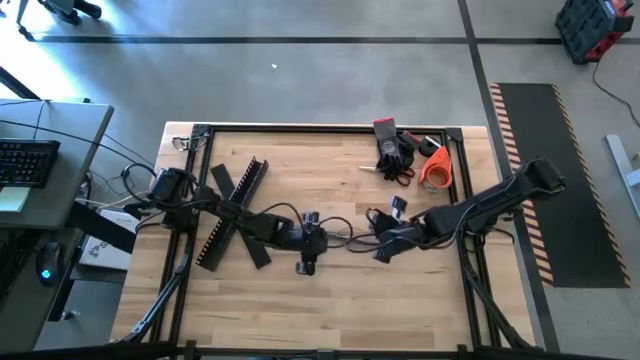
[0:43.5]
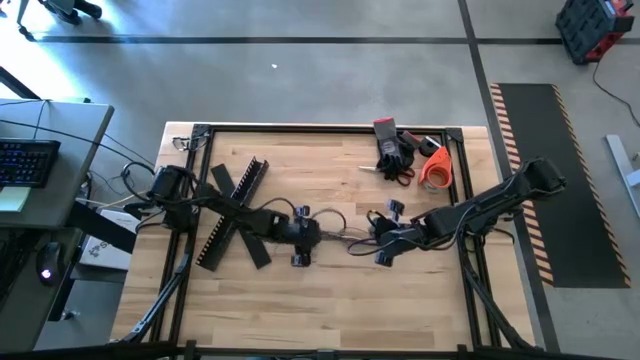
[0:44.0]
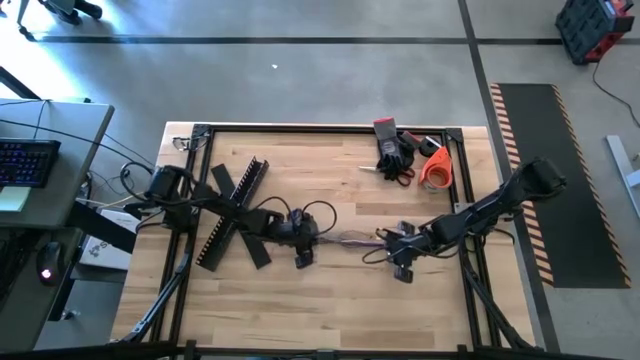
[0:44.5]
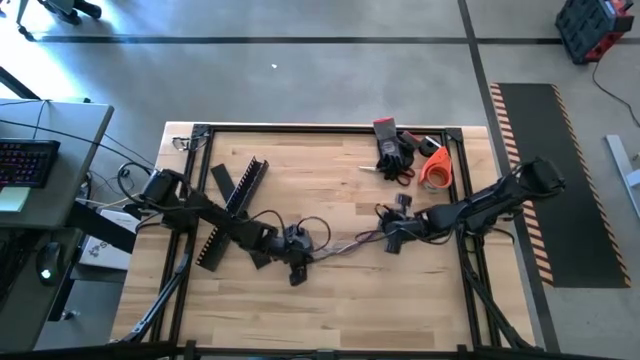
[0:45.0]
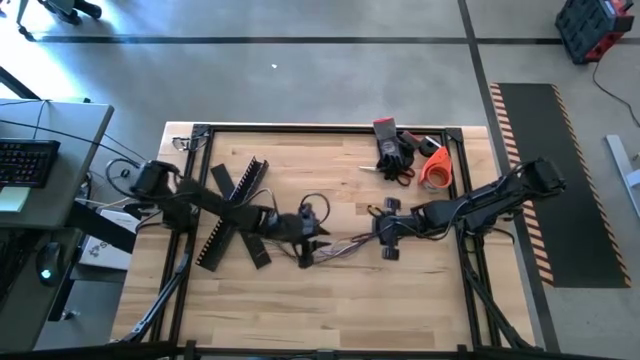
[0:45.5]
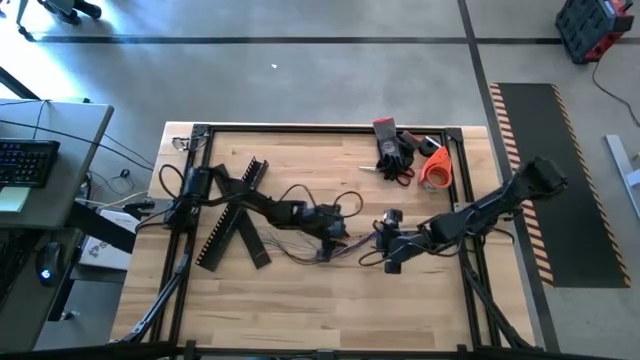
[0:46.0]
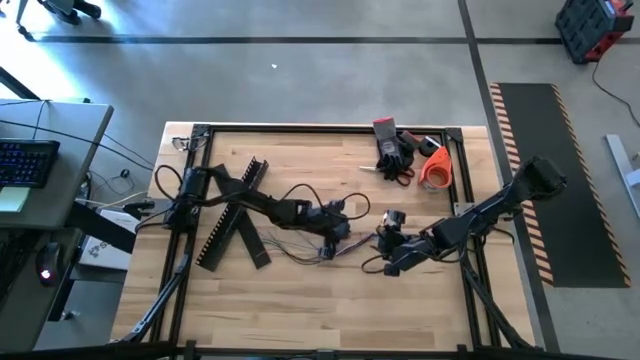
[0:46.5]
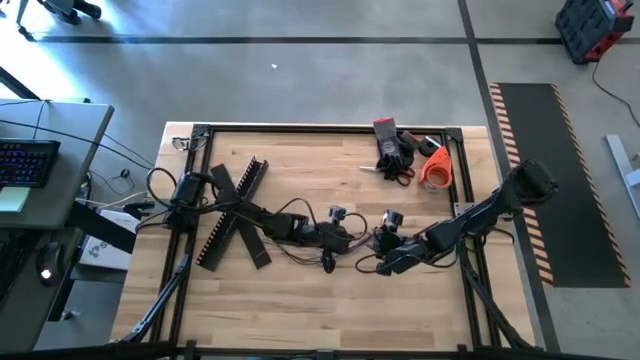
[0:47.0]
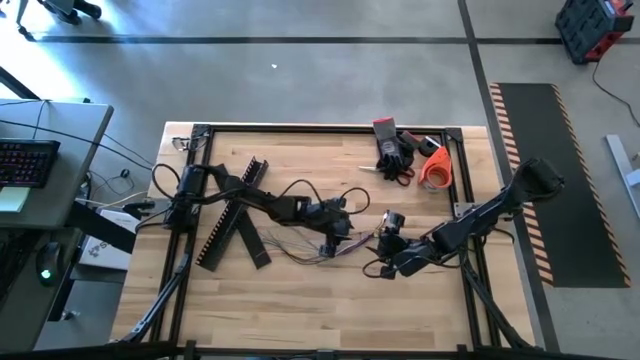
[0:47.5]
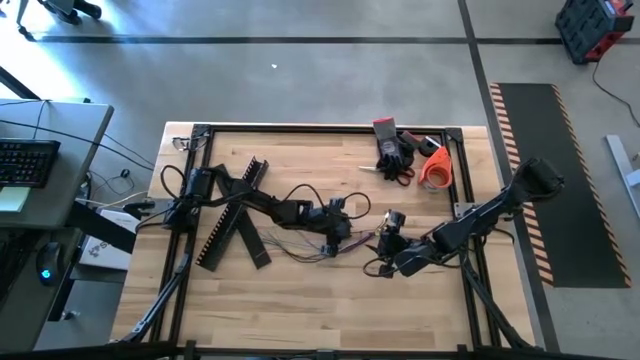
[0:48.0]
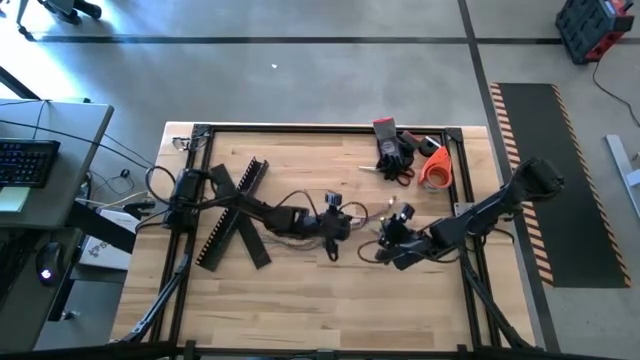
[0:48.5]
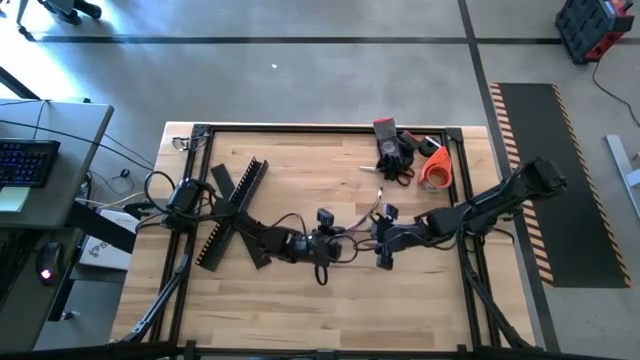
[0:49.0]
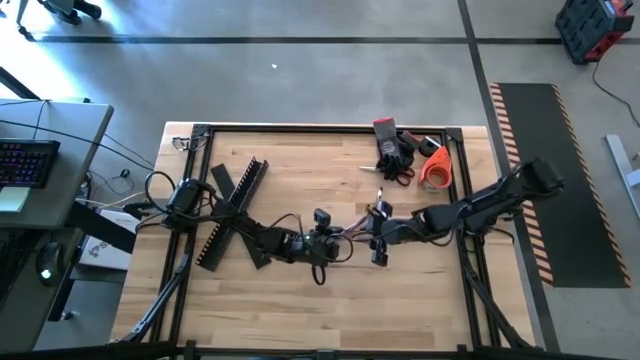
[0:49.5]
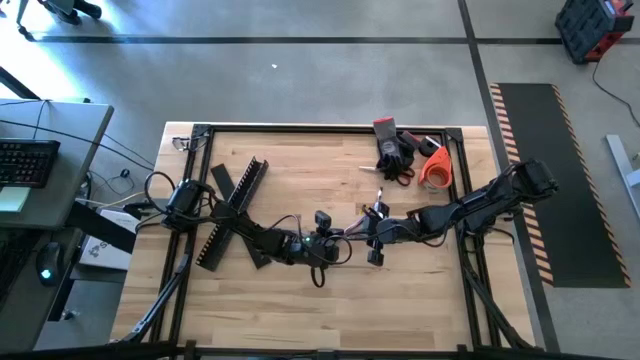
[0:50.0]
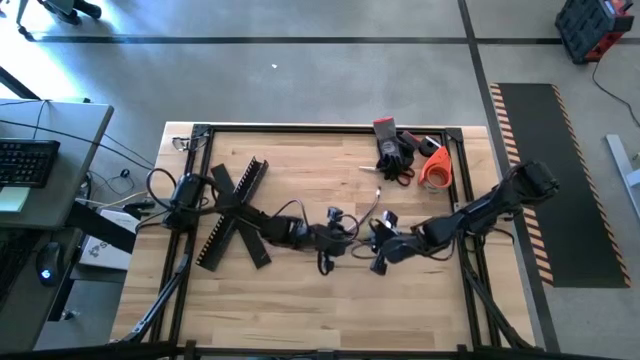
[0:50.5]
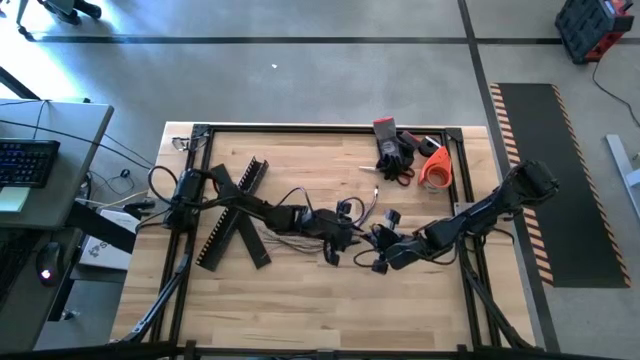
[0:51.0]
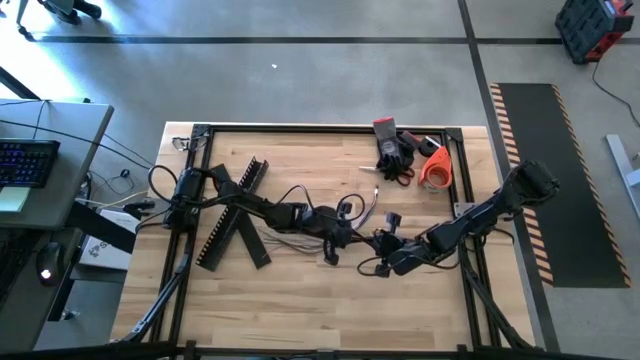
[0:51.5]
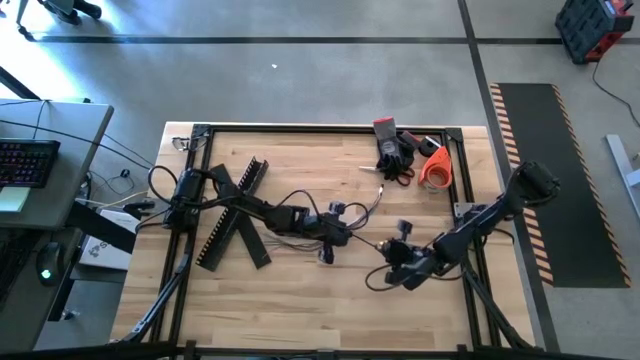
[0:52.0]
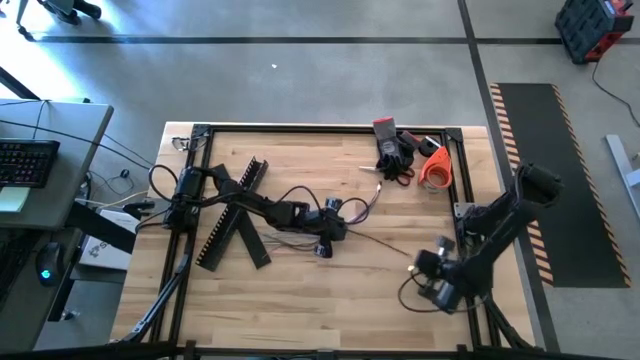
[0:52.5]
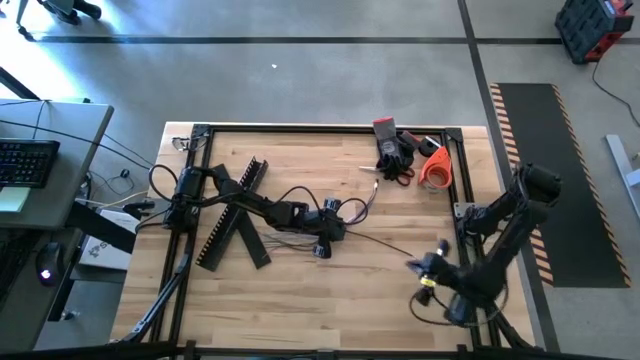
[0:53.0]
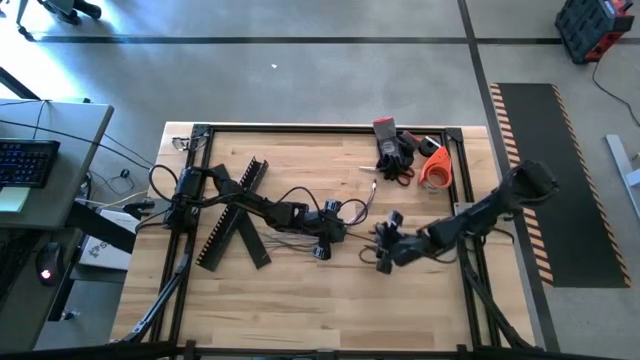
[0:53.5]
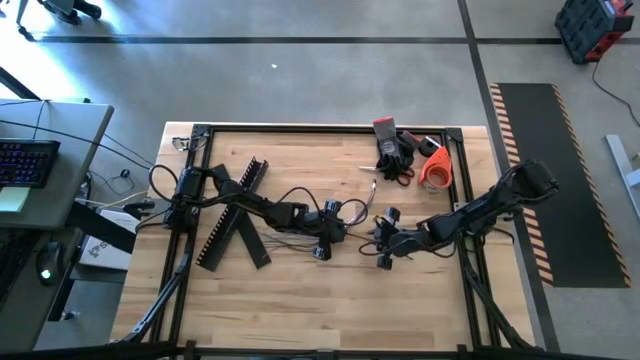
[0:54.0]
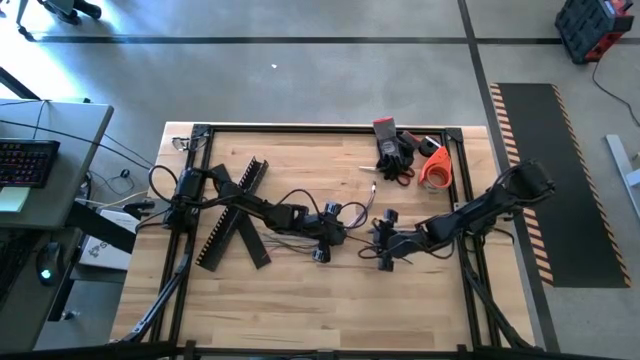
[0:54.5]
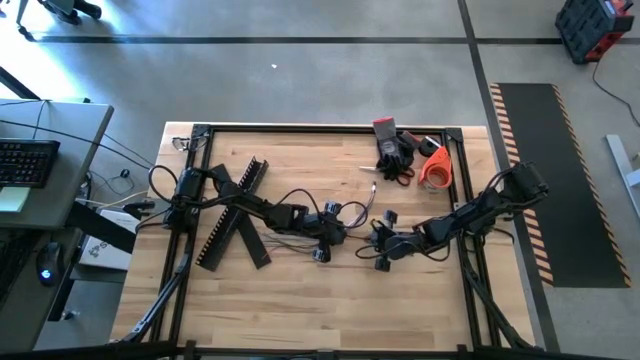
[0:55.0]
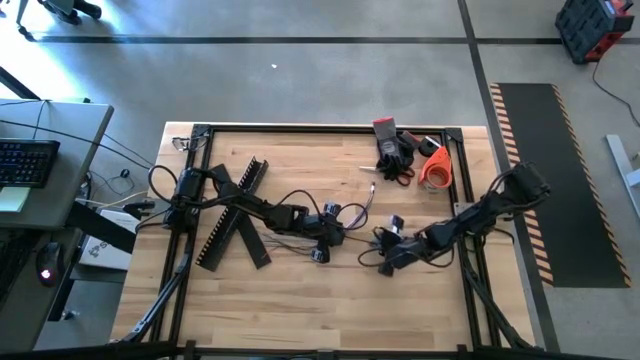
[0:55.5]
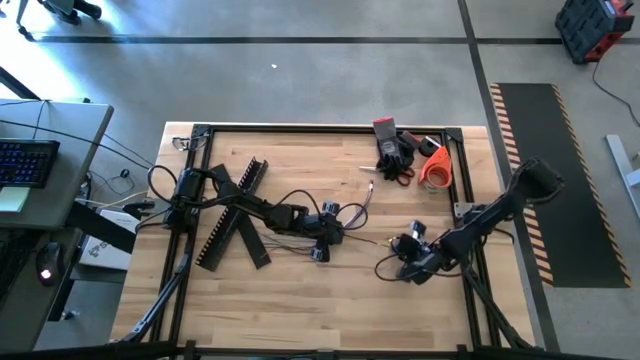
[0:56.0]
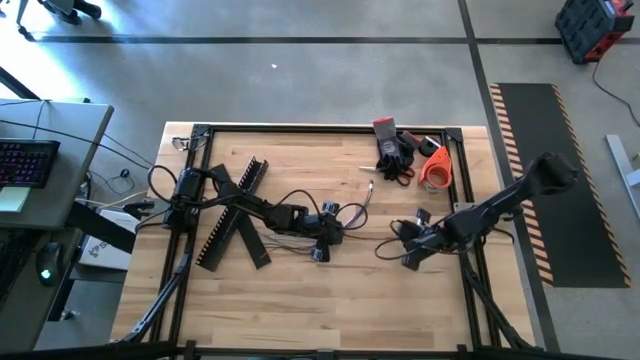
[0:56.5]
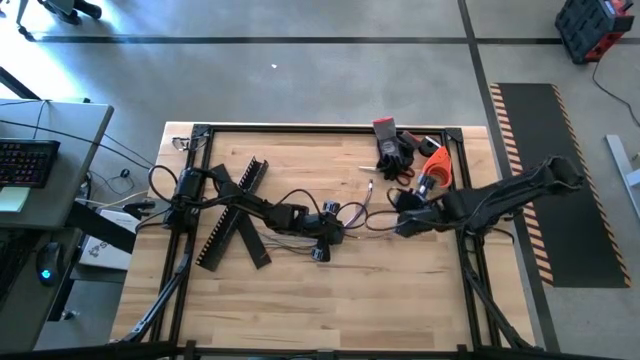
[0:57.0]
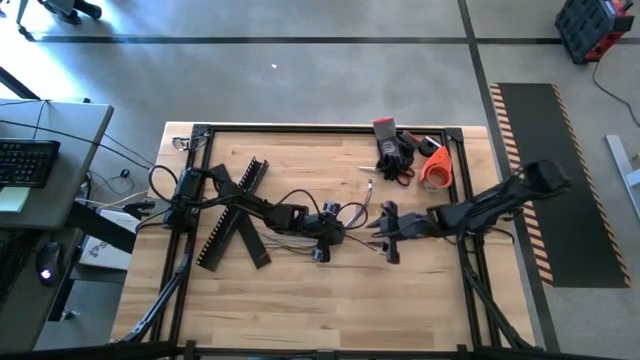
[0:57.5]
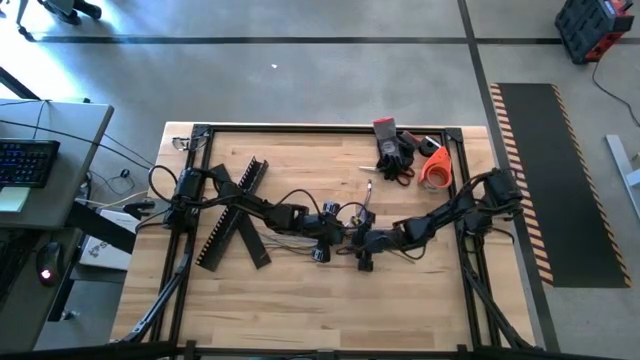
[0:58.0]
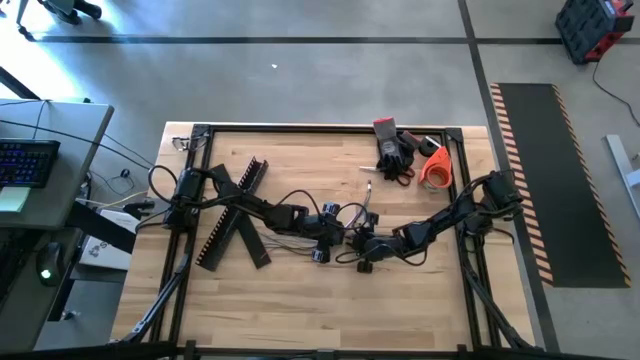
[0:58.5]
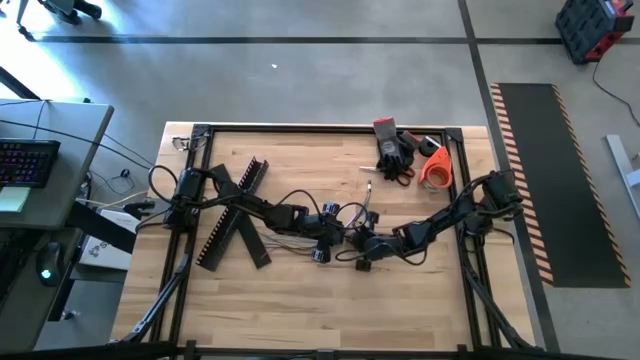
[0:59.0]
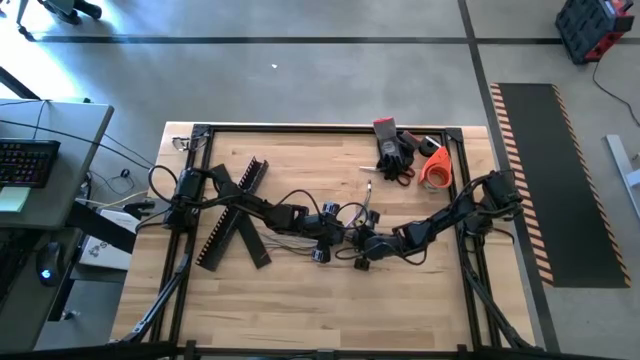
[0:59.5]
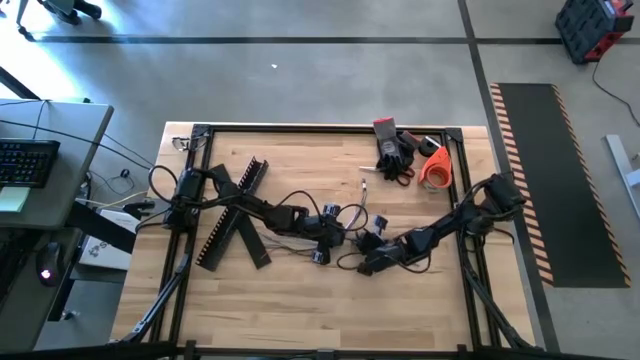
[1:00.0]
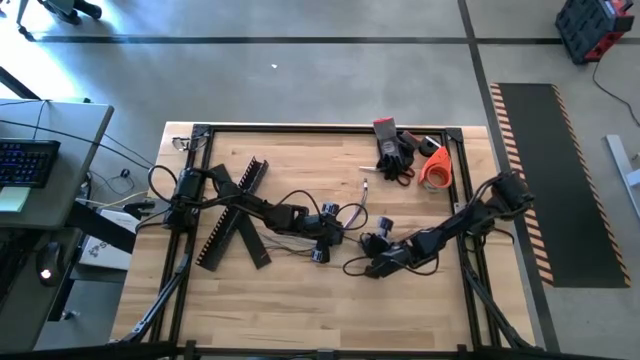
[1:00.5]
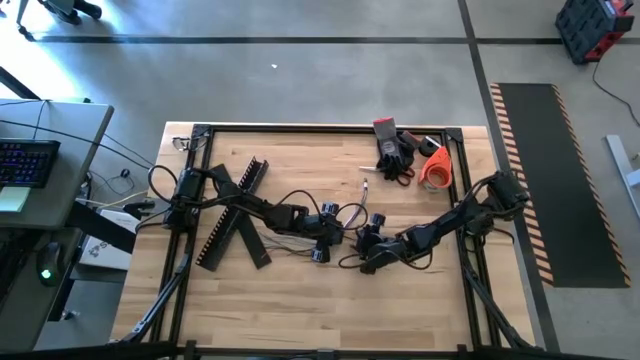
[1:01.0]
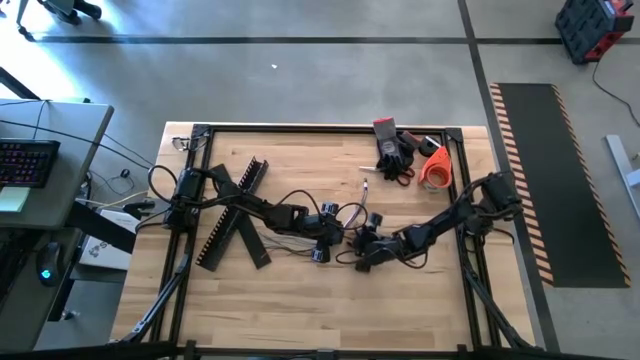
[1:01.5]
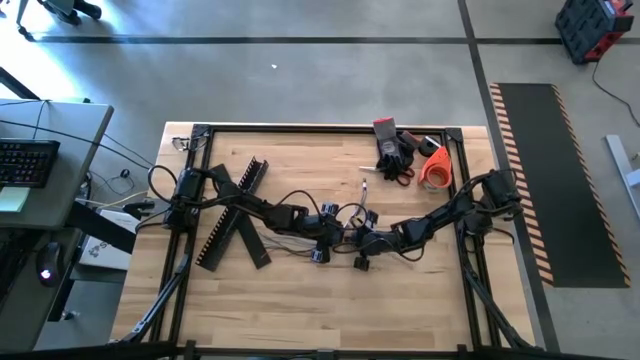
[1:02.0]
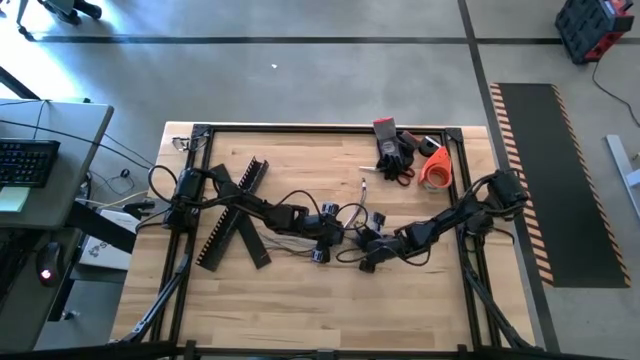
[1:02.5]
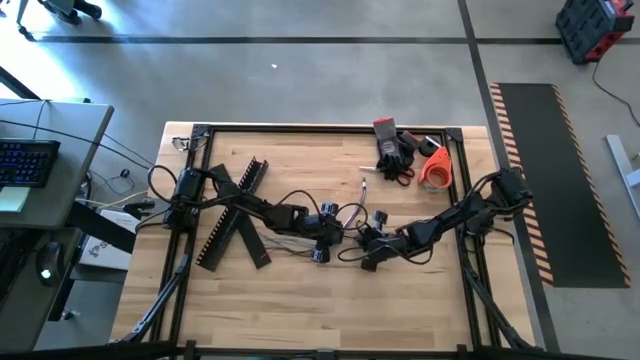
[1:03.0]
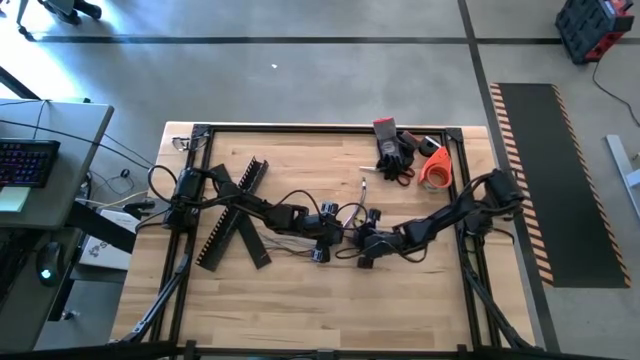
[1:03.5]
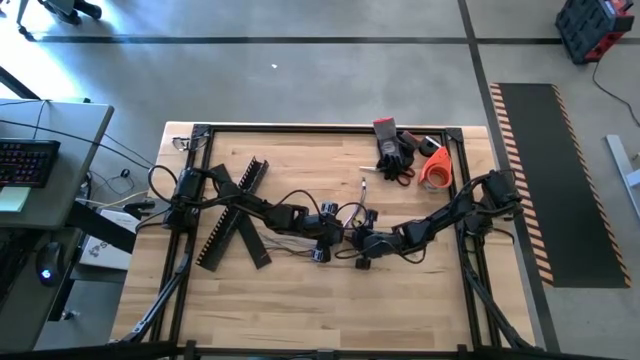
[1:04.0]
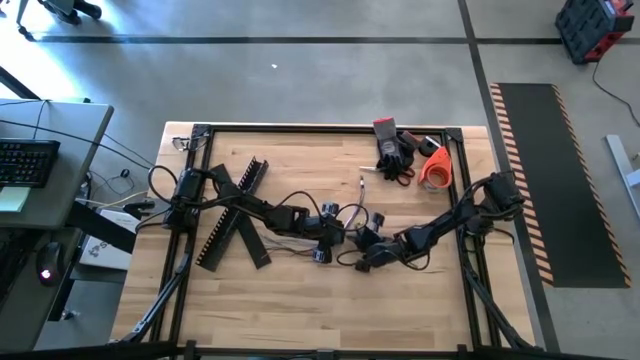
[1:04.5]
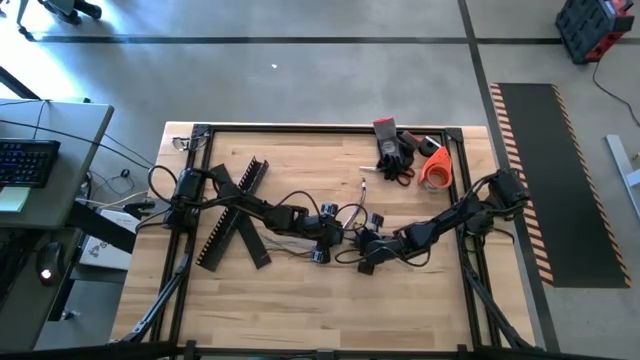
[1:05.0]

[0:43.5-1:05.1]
Task: Ziptie cables
Wrap the cable wires with the black zip tie
